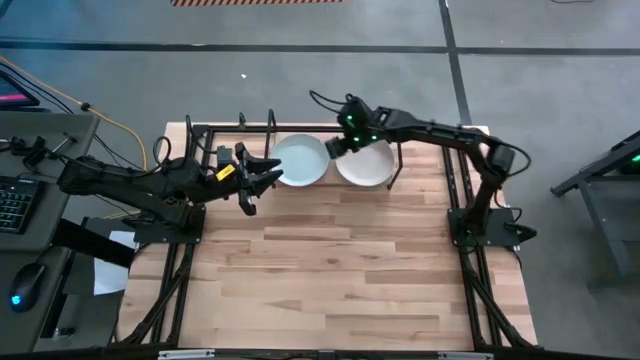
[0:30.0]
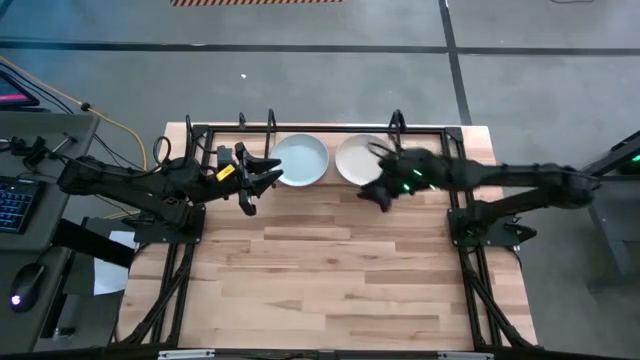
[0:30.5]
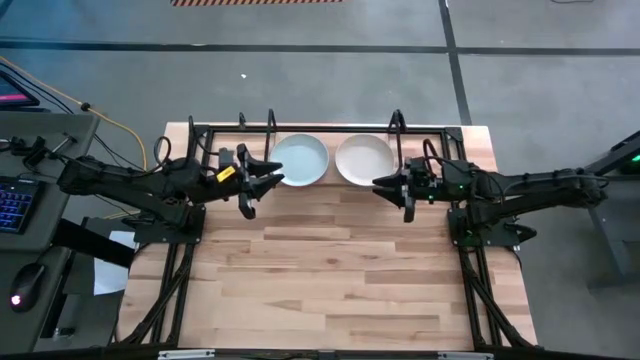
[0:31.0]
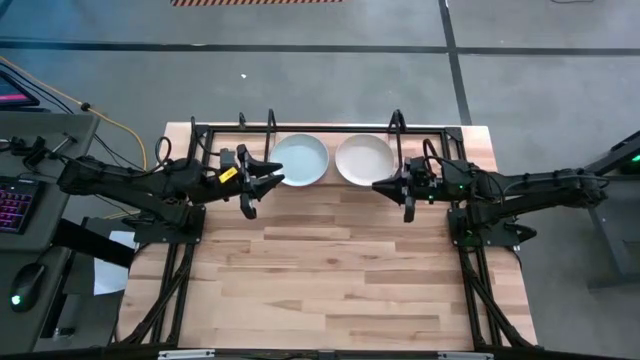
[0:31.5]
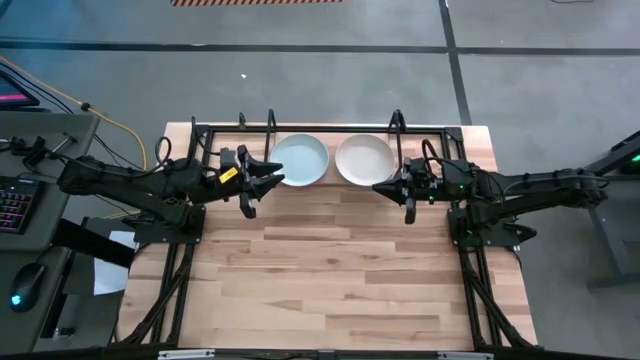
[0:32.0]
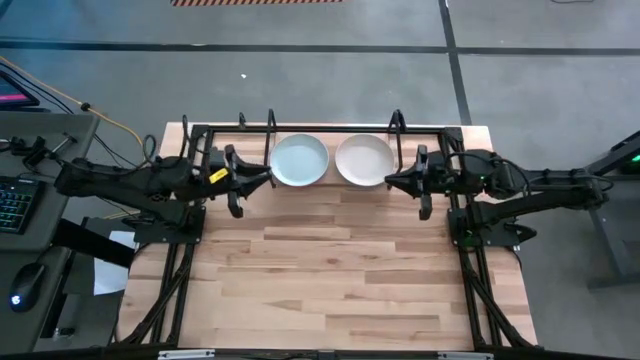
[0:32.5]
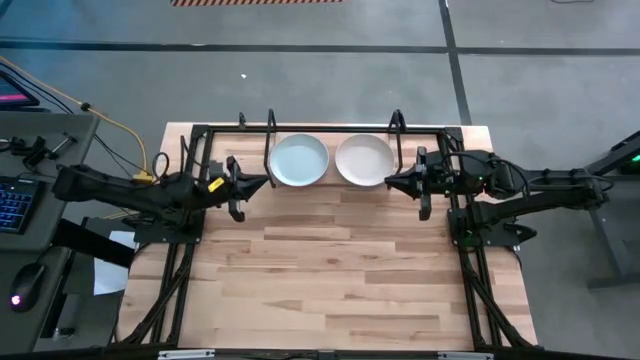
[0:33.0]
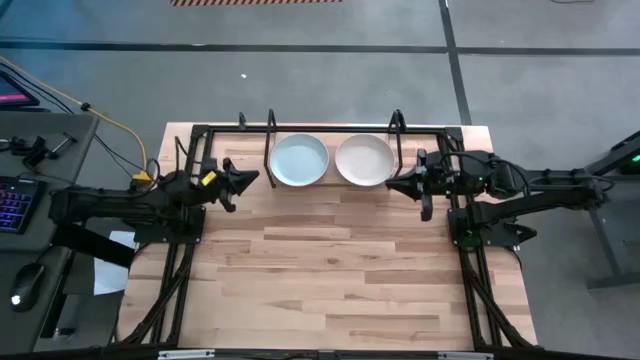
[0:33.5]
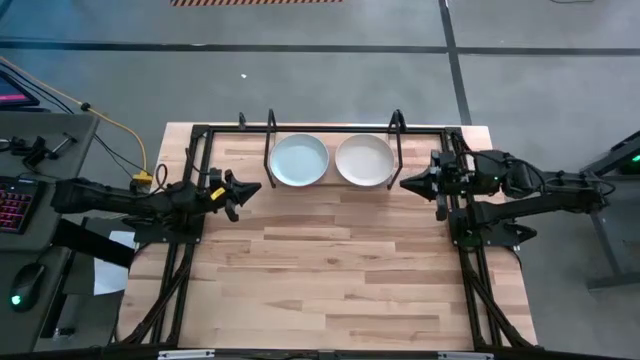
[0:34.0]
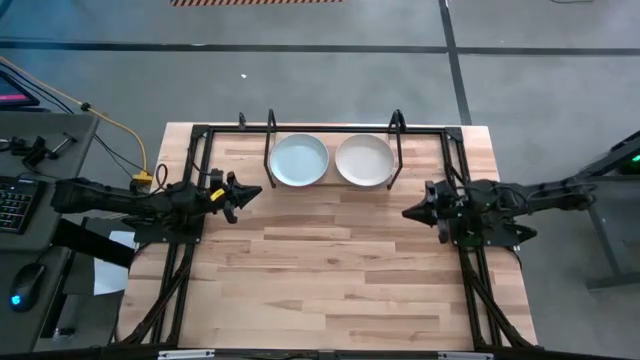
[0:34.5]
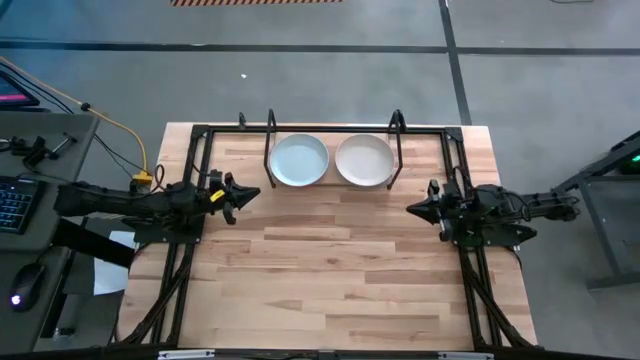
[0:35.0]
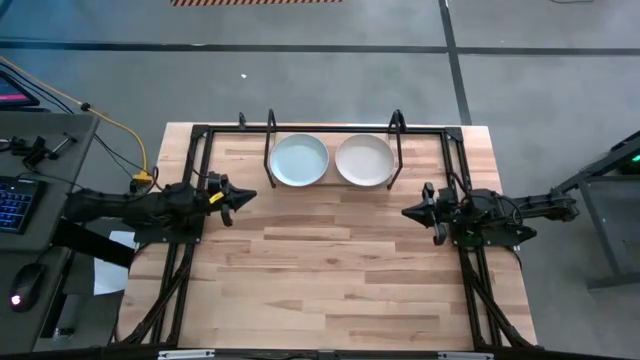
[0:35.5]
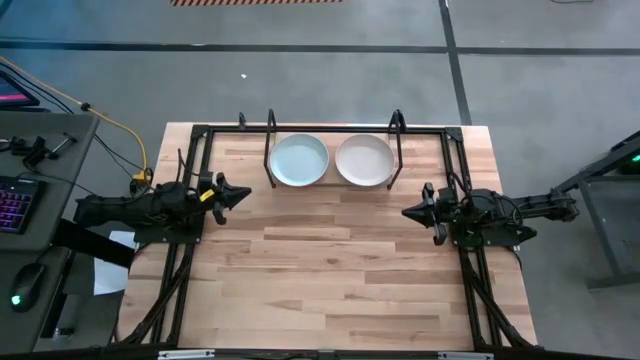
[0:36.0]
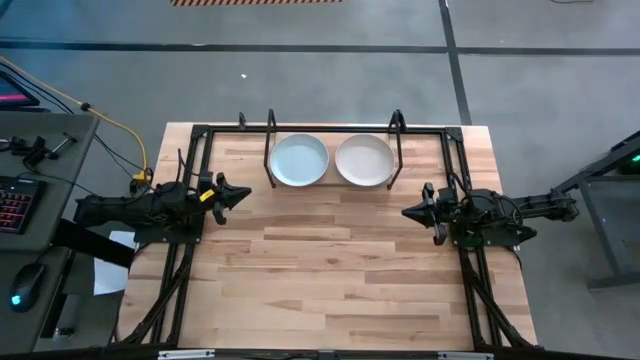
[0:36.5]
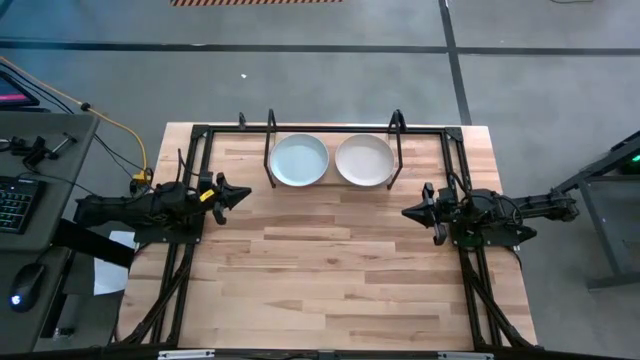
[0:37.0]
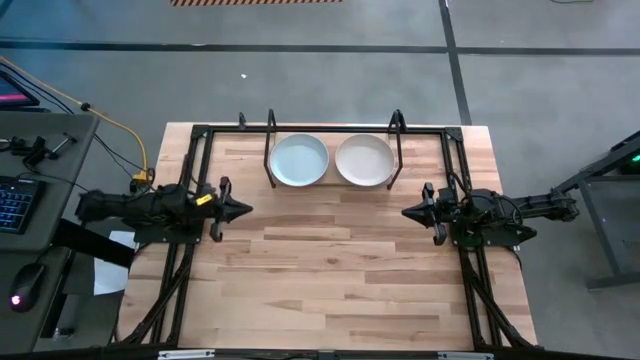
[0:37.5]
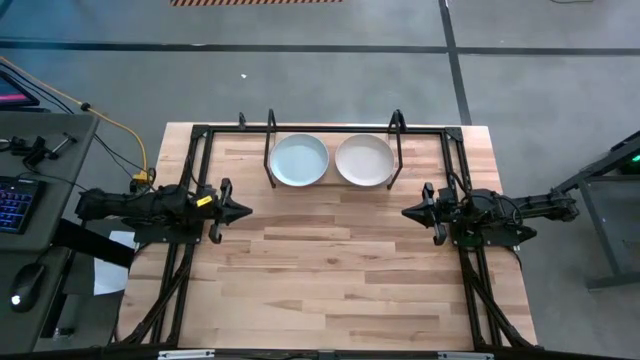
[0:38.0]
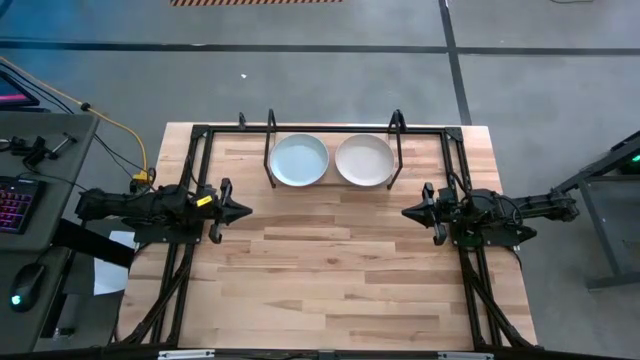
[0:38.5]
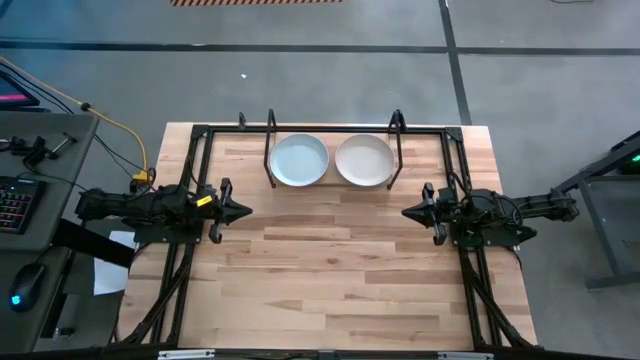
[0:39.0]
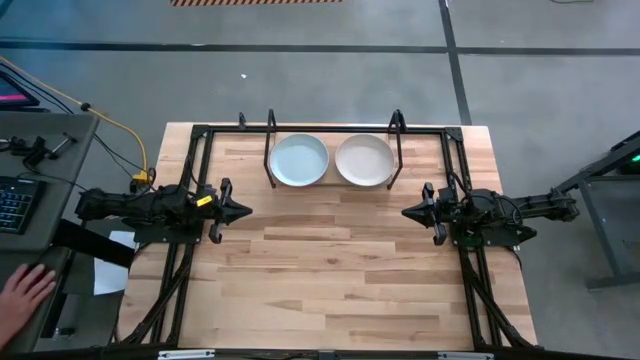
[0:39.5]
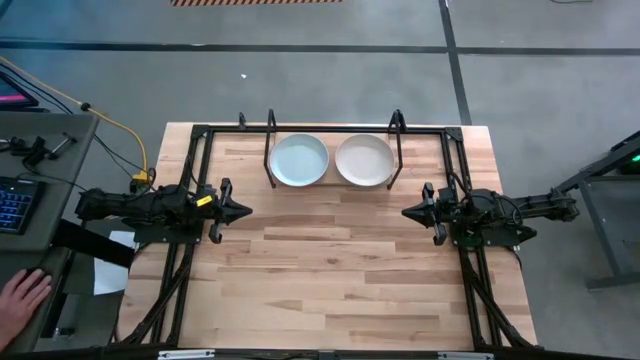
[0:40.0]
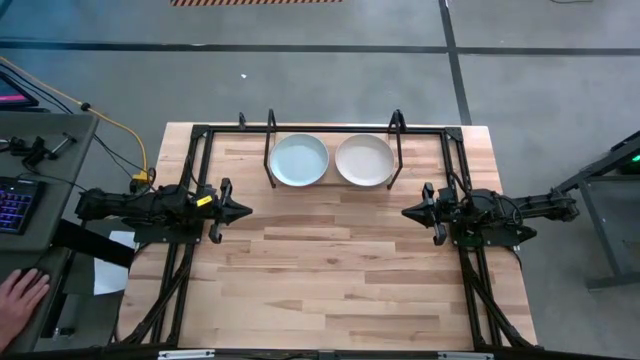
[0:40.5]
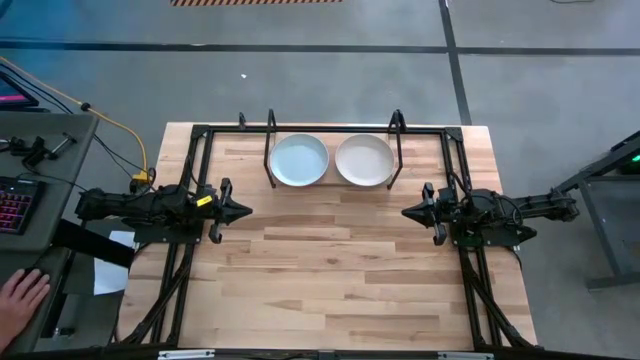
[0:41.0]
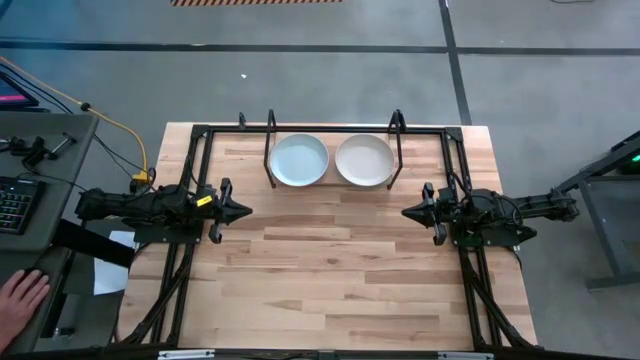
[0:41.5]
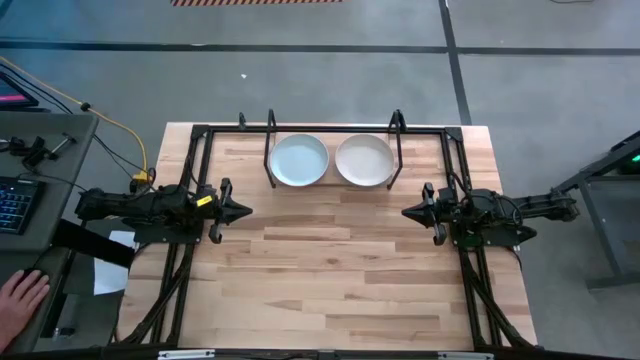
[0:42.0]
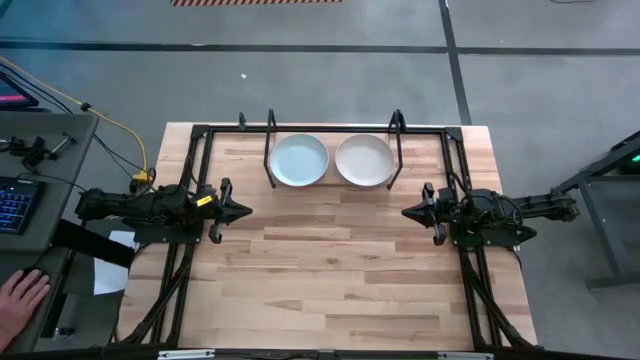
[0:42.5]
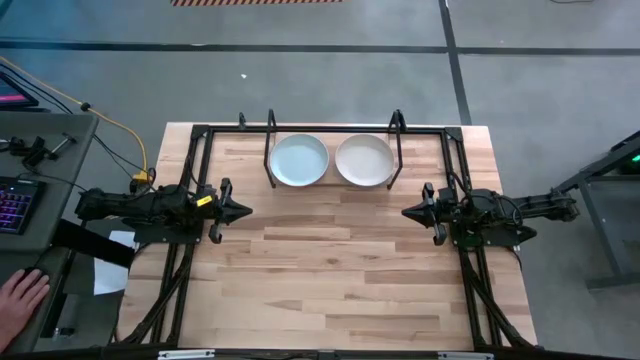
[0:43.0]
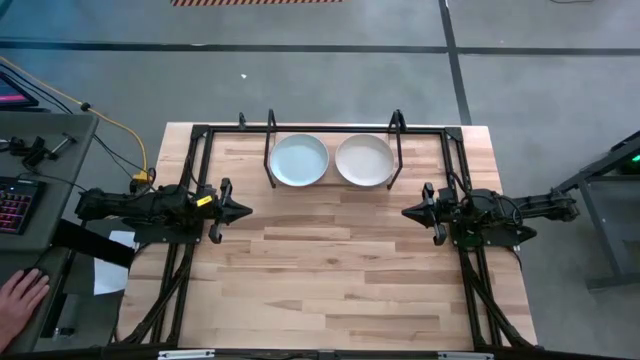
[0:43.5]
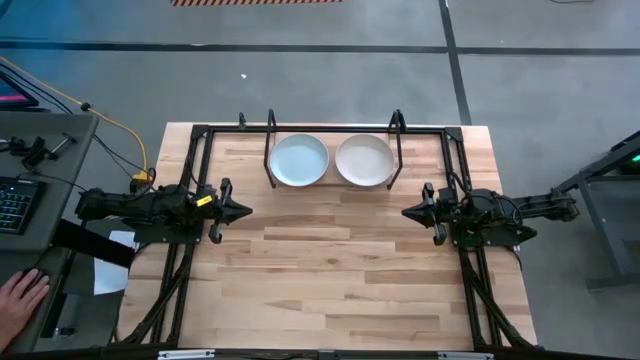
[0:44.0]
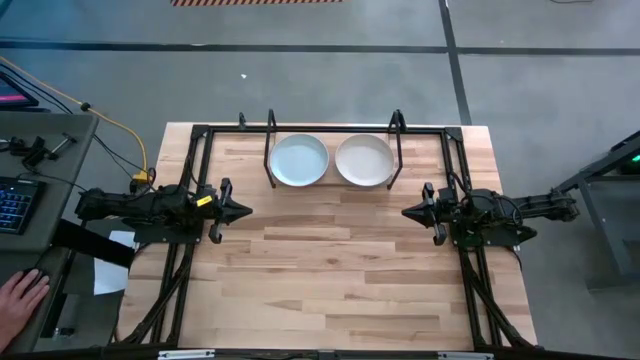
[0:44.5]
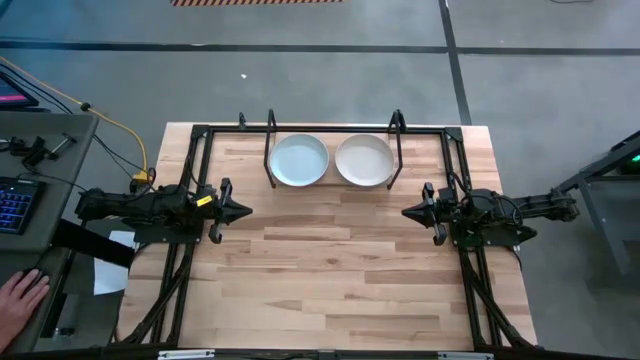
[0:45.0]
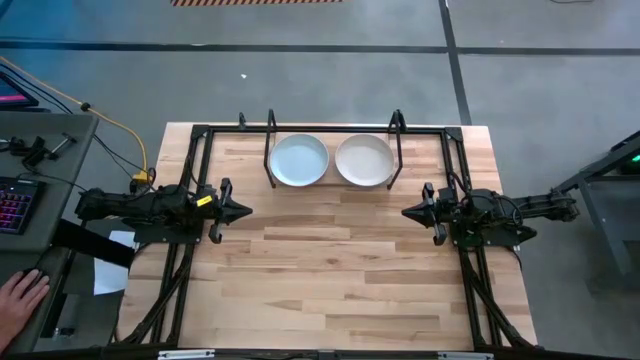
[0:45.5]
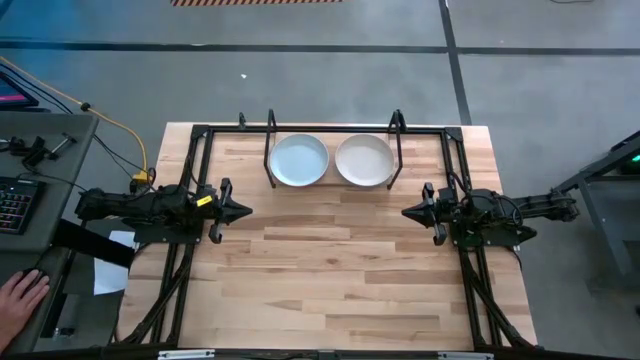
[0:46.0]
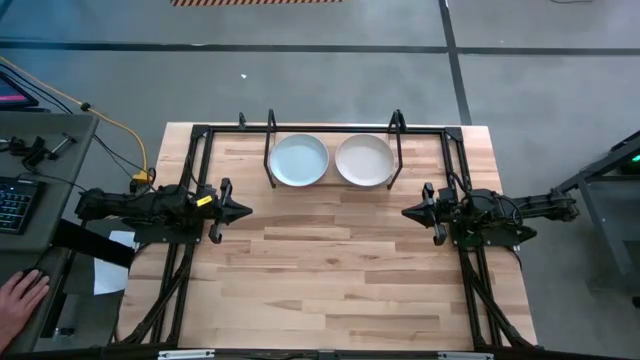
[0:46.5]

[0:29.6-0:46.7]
Task: Place and stack plates onto a shelf
Return to Home Position
